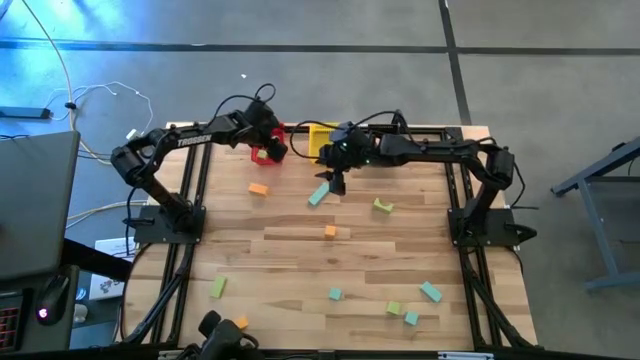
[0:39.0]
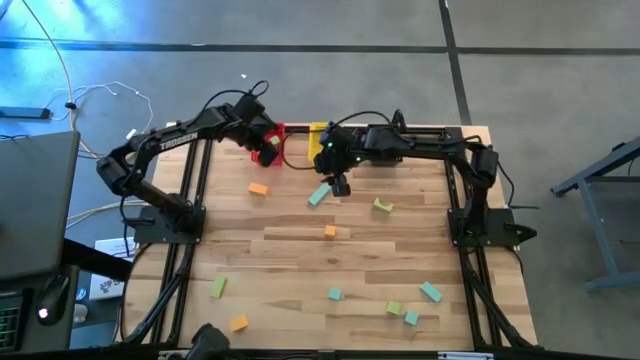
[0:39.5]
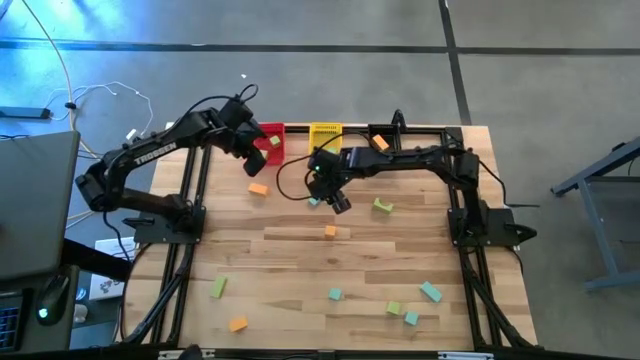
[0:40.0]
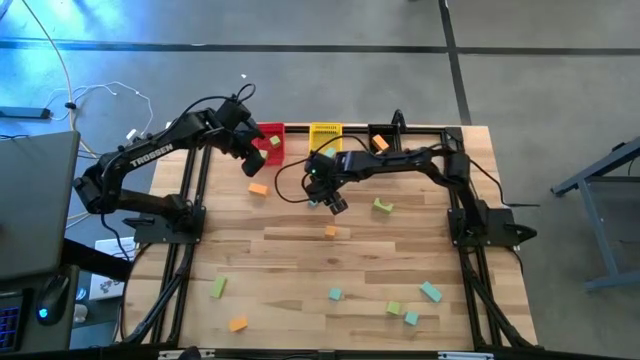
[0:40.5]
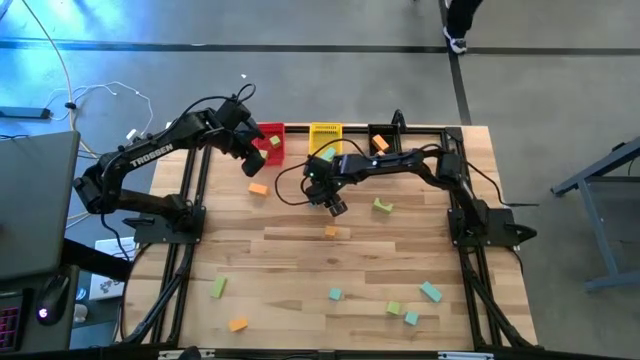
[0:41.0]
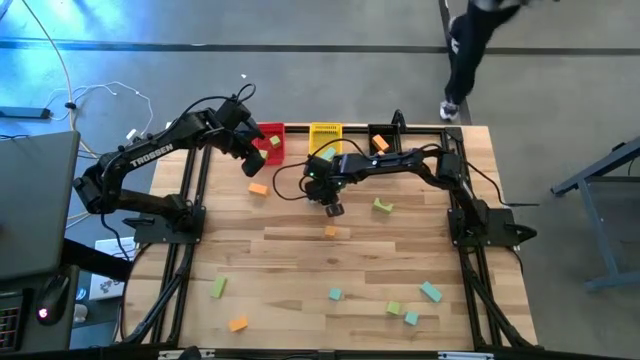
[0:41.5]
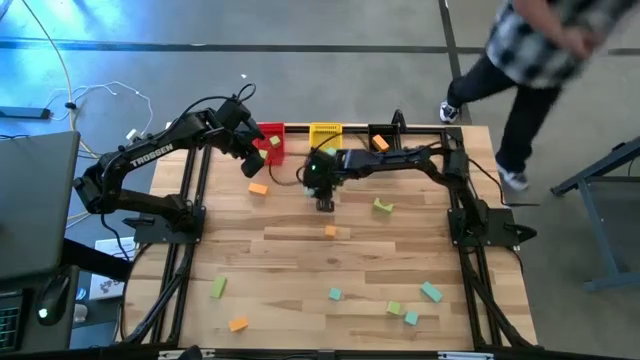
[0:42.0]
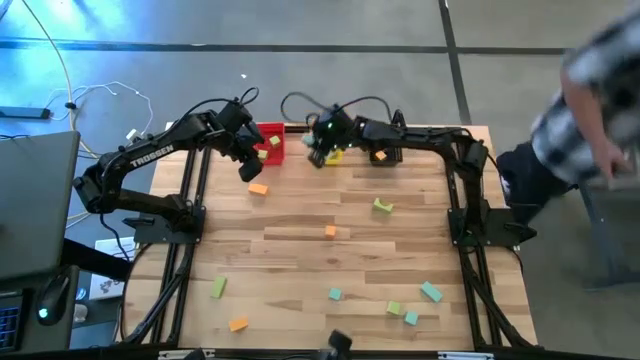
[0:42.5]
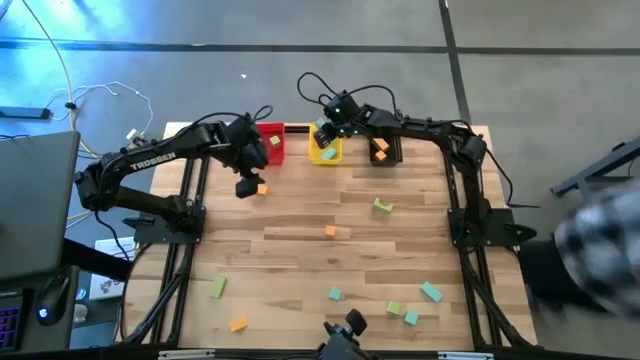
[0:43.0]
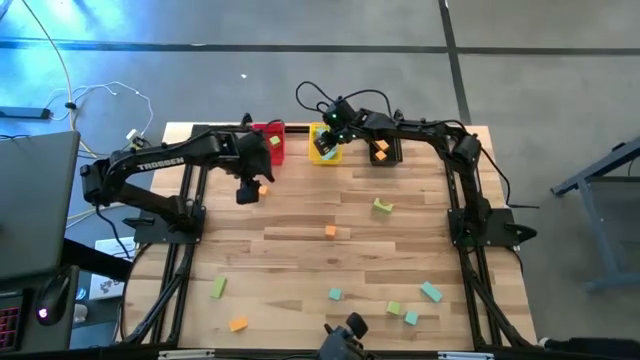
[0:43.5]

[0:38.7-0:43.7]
Task: Sort & place blocks by color
Put the blue block into the yellow basket

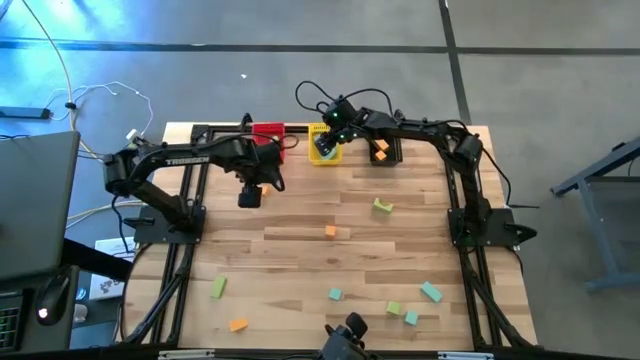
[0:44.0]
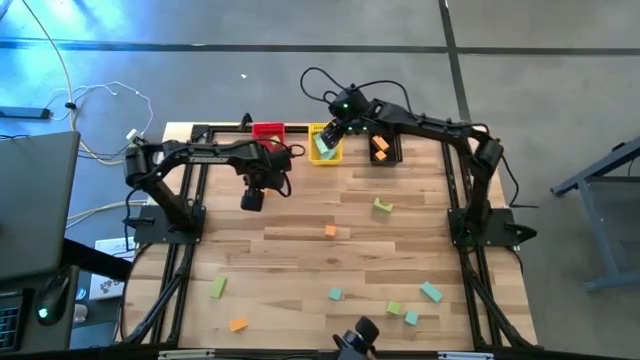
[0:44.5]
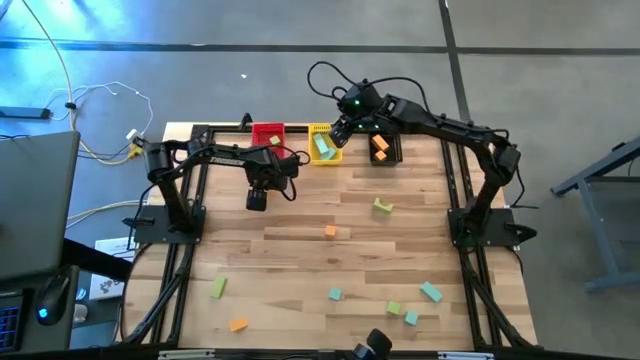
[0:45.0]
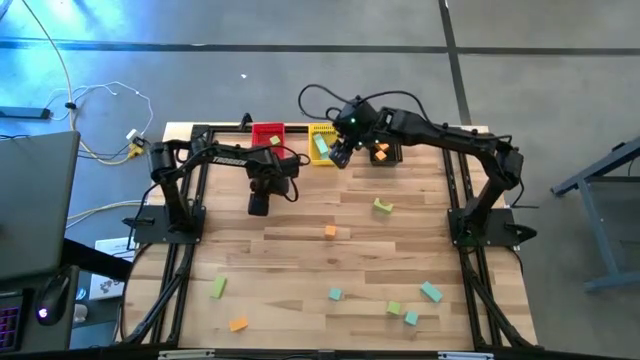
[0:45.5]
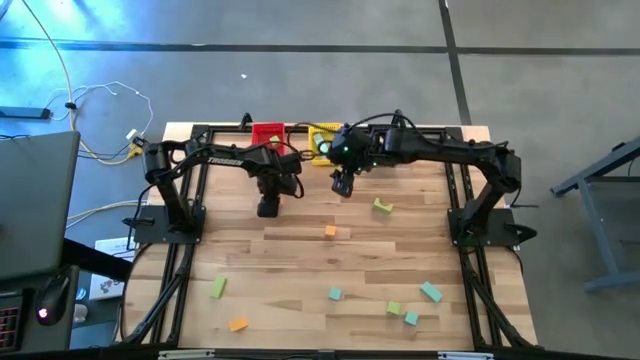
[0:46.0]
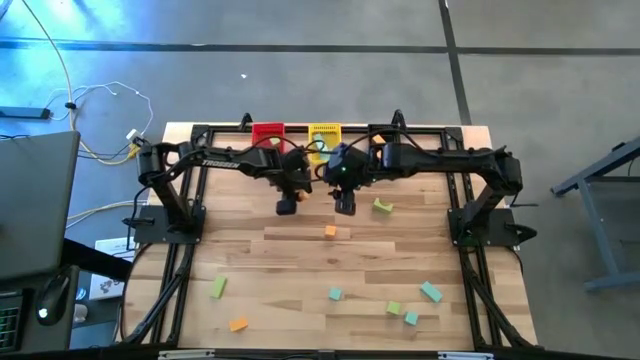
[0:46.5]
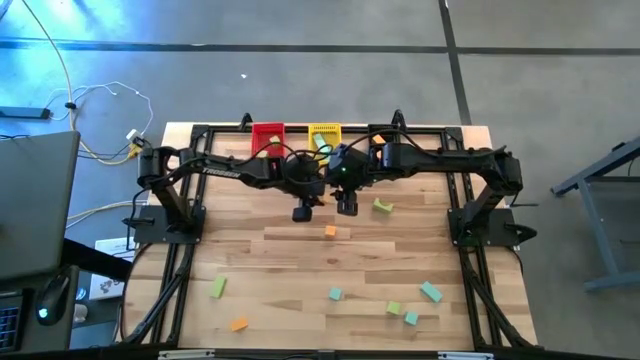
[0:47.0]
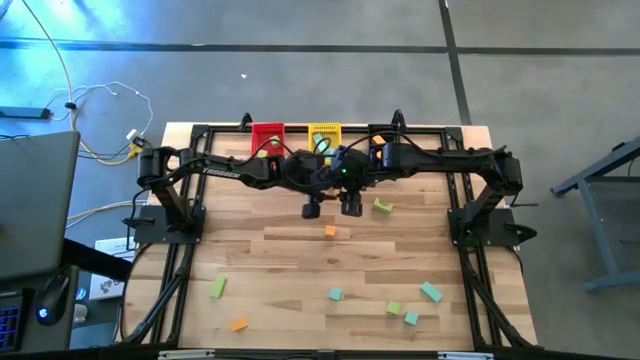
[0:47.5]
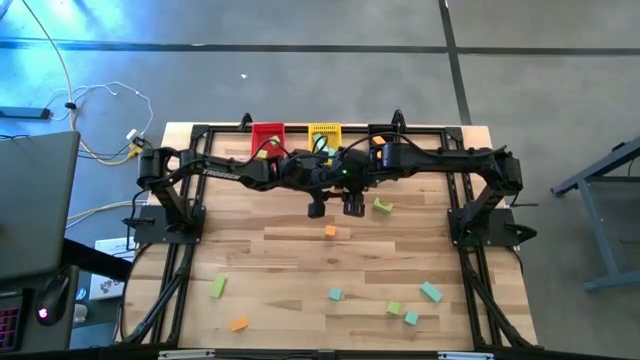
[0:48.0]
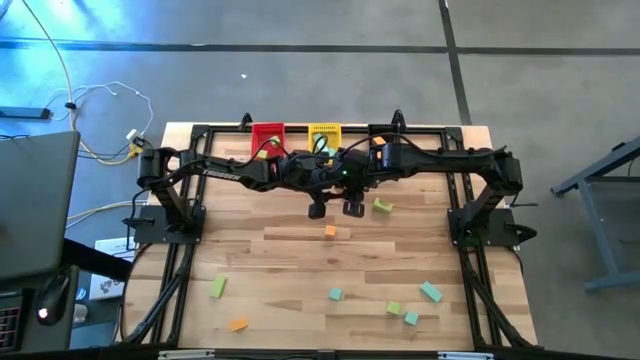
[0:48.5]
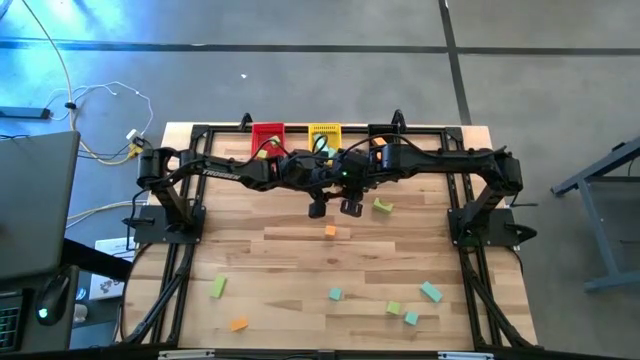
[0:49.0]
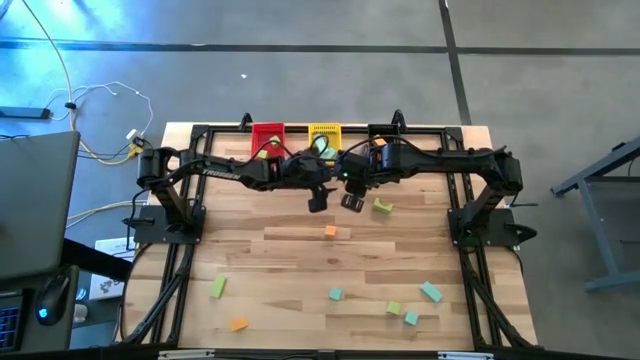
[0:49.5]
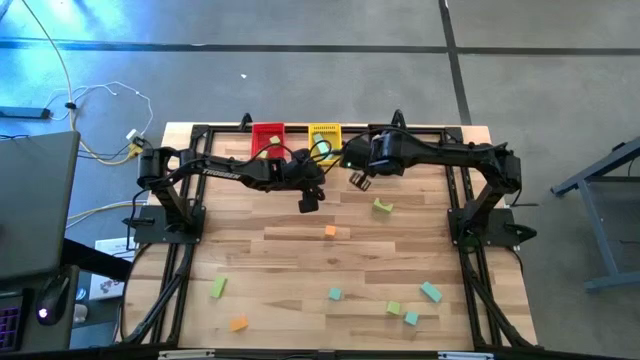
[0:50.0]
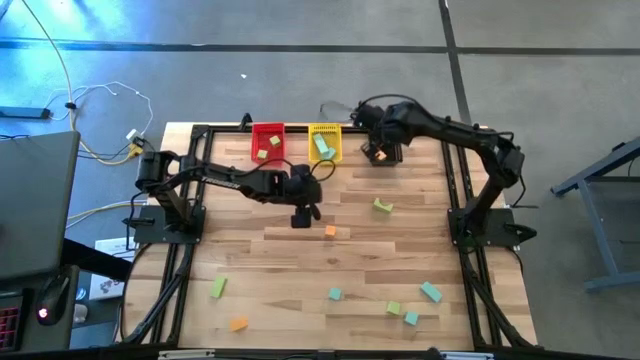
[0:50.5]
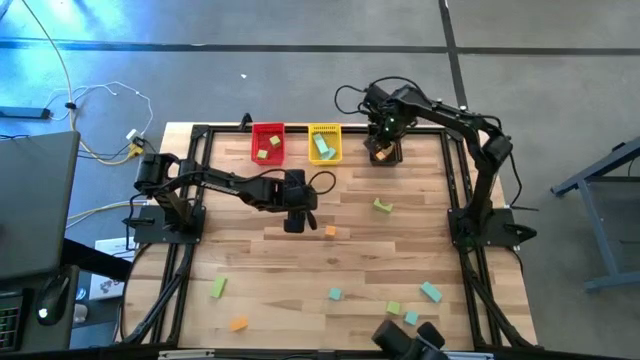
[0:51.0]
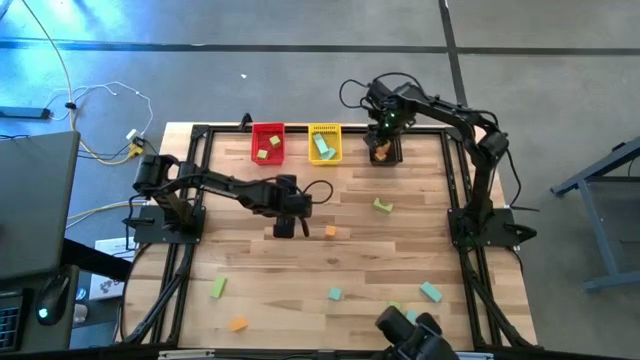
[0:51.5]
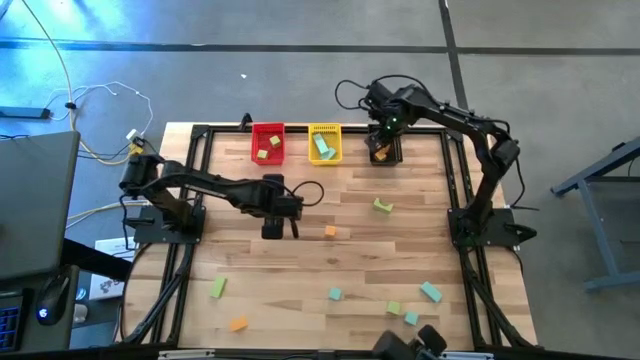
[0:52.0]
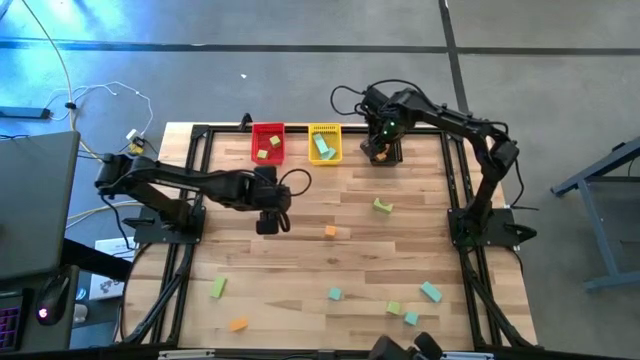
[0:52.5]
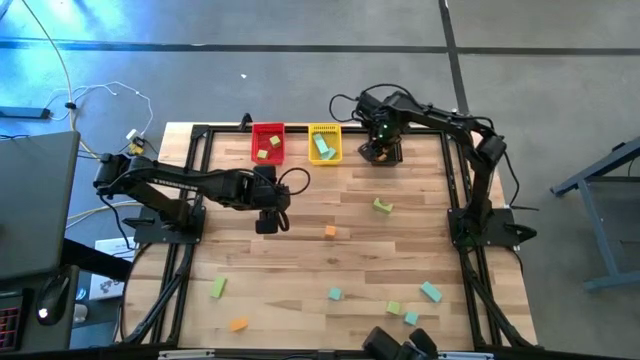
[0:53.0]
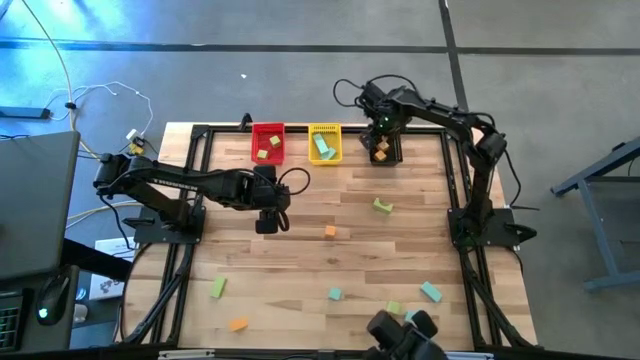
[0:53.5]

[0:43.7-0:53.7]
Put the orange block into the black basket

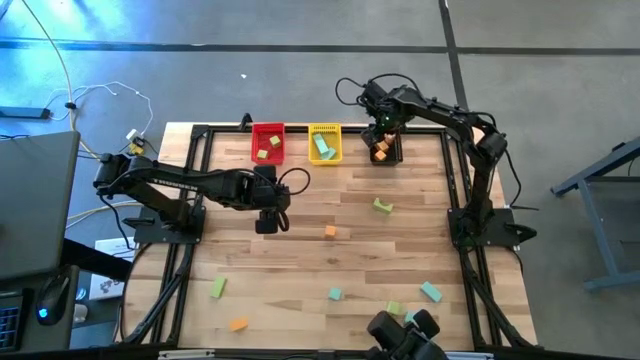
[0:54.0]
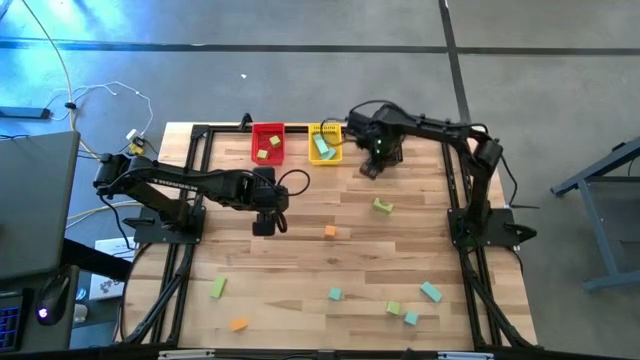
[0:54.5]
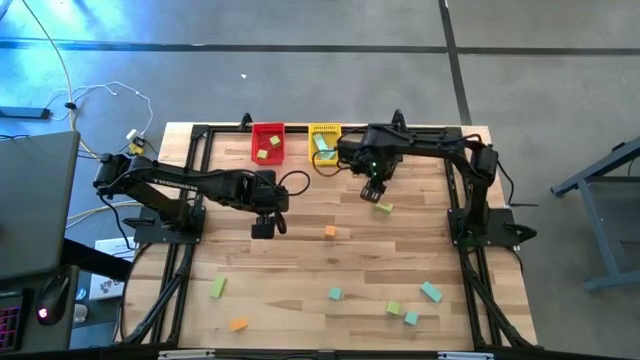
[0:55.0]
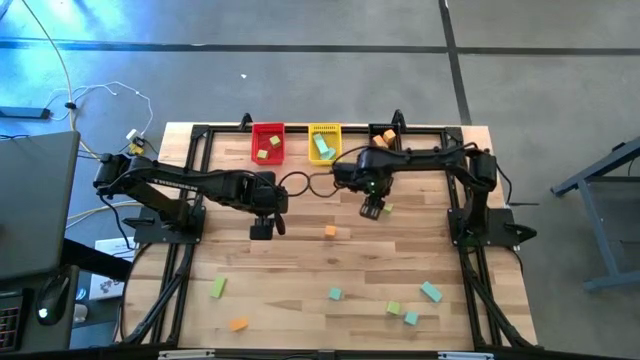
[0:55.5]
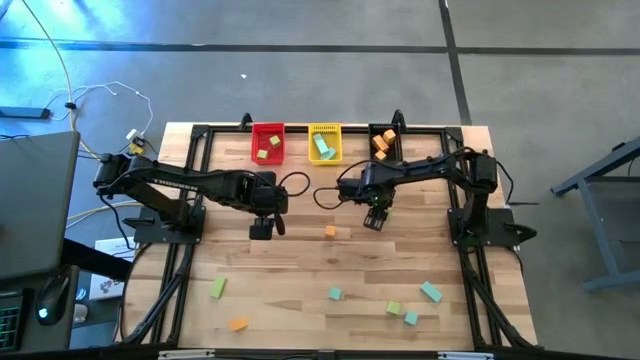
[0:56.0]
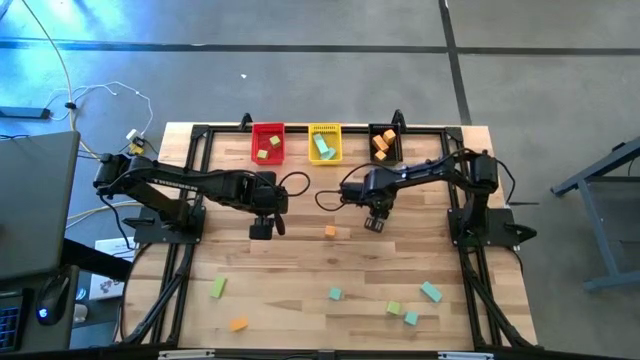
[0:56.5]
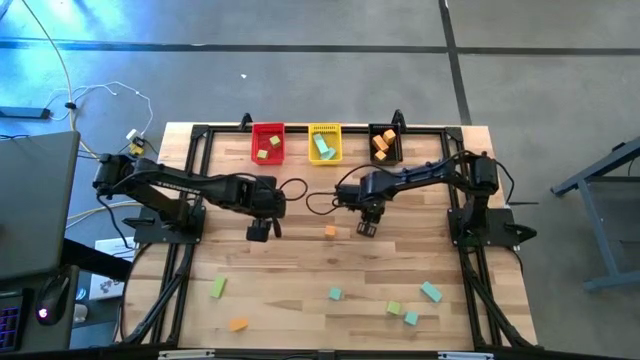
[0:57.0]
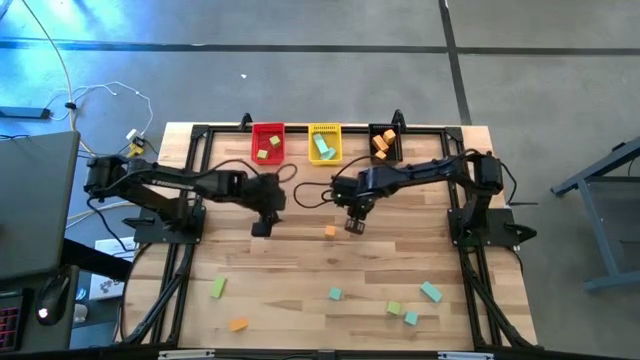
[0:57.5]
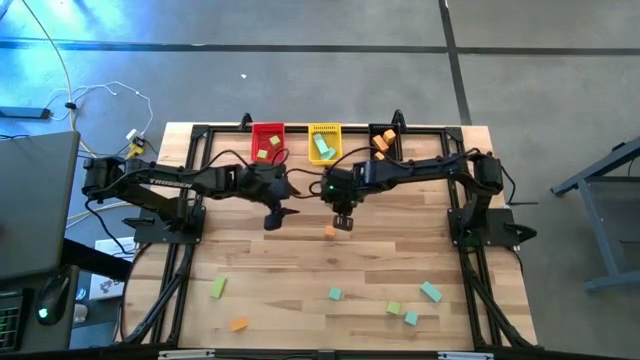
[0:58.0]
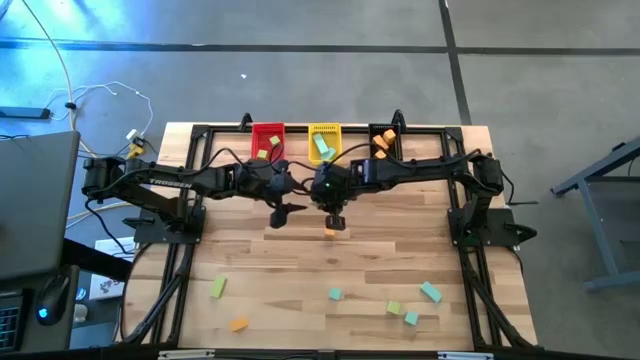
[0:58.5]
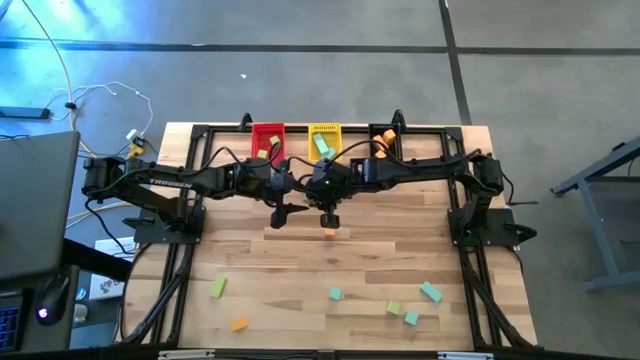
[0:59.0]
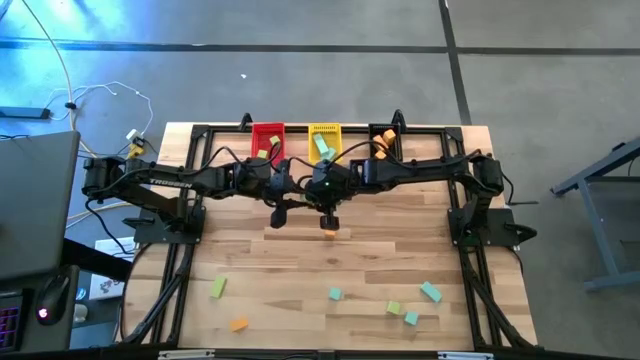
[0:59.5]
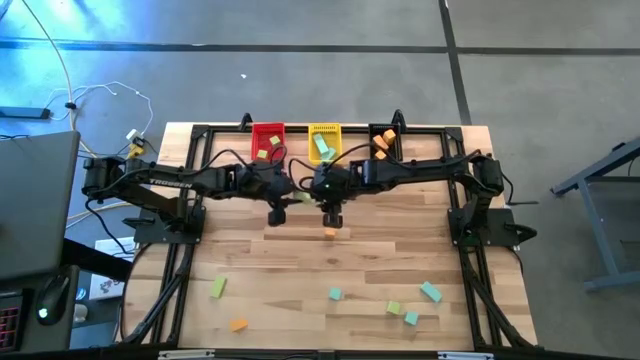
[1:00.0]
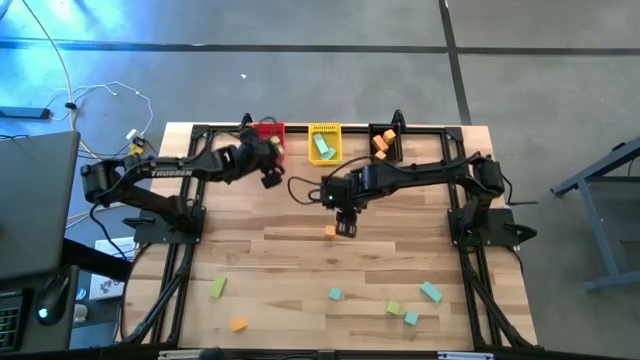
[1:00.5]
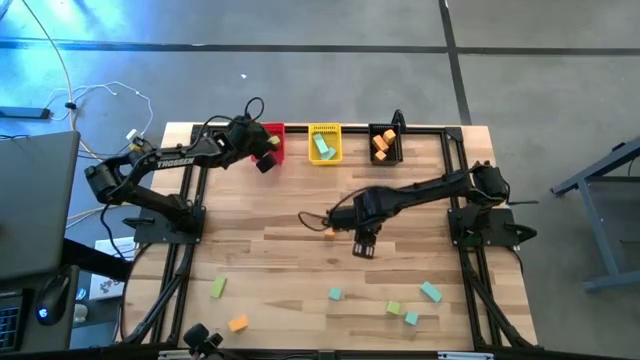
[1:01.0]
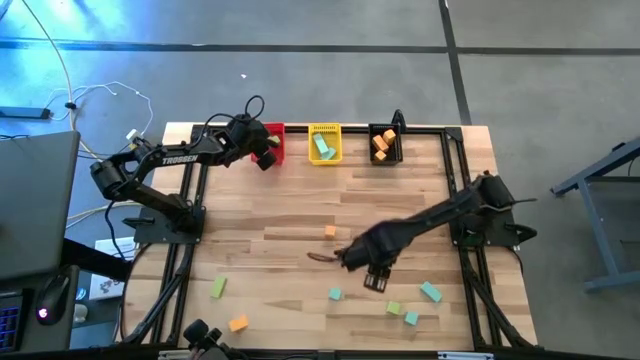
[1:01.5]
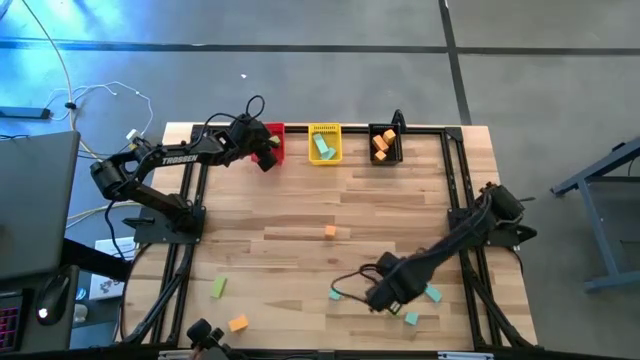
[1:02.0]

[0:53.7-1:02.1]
Put the green block into the red basket
